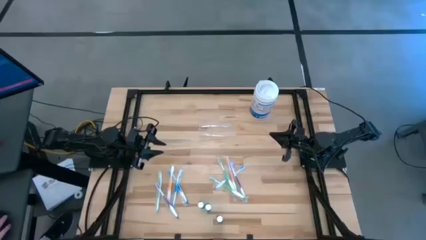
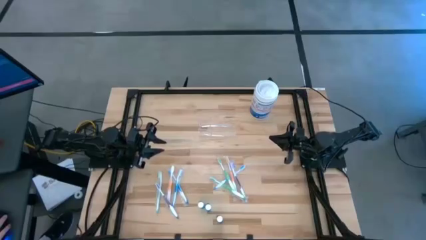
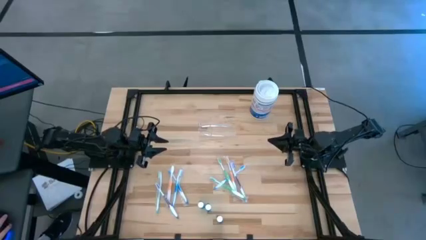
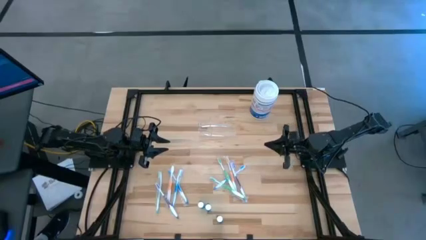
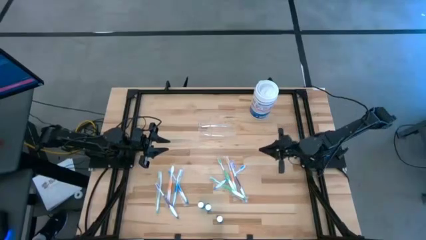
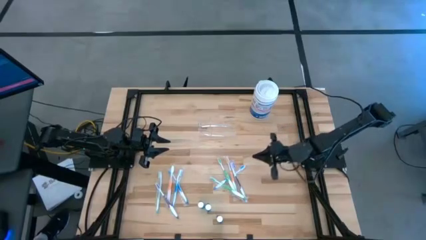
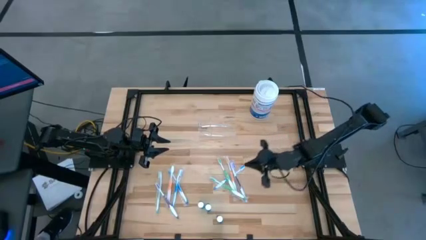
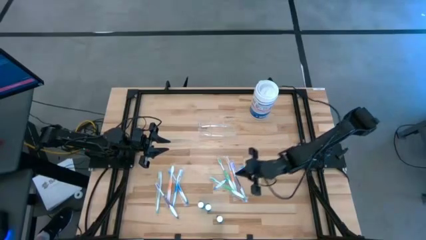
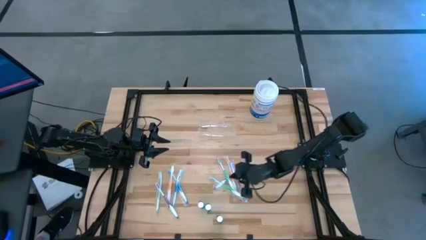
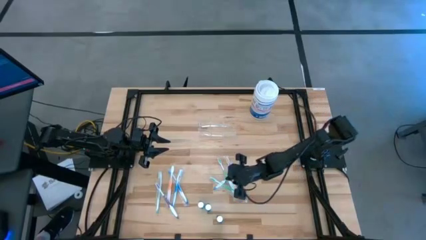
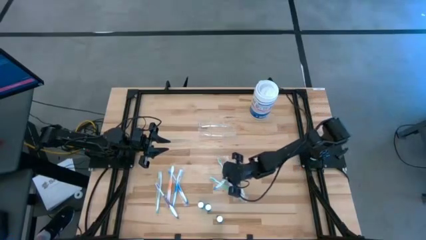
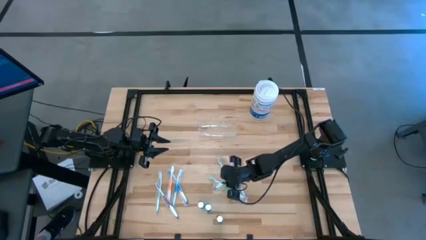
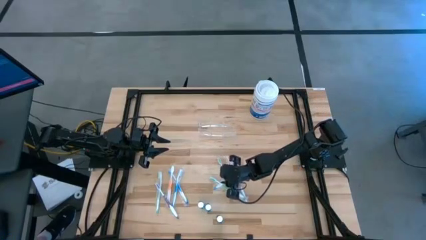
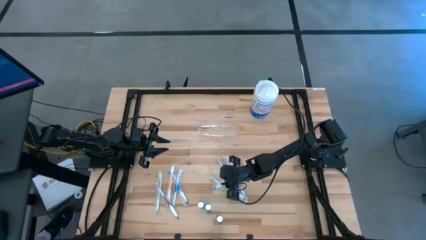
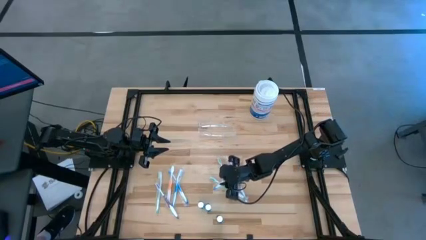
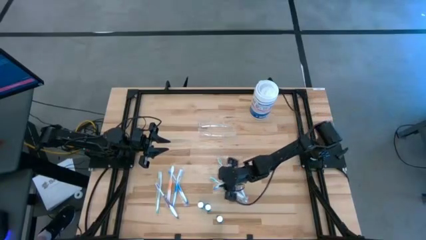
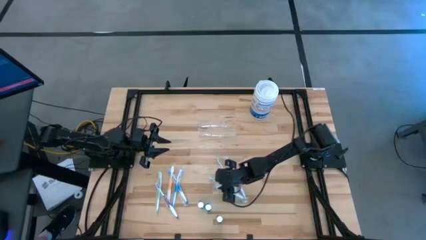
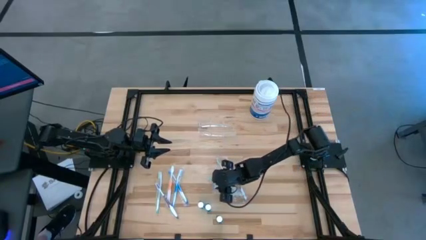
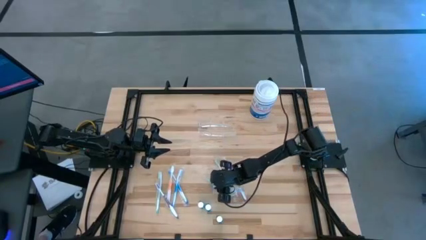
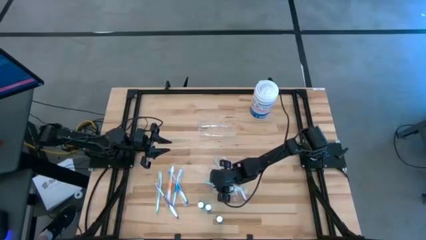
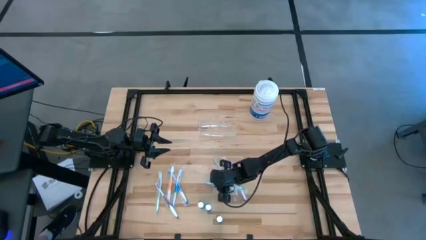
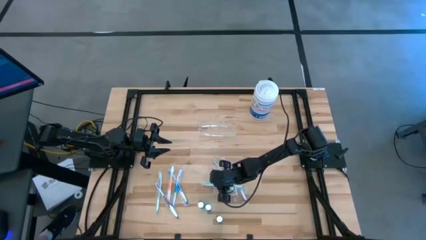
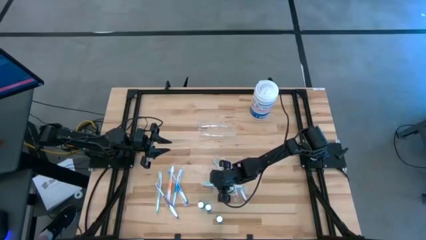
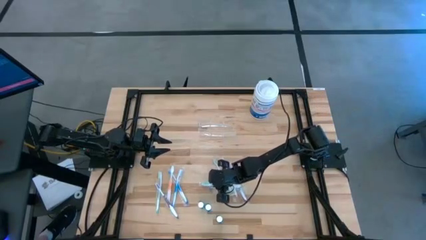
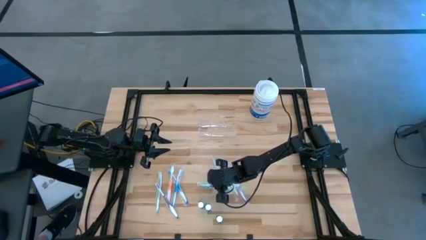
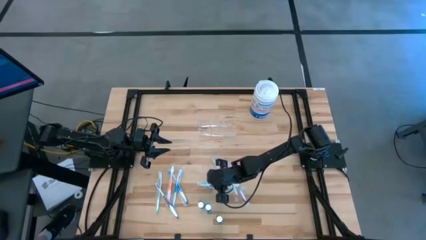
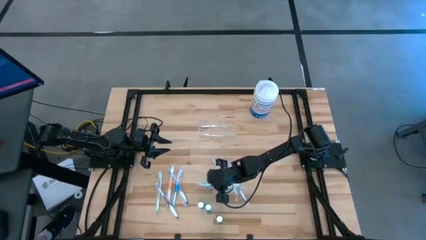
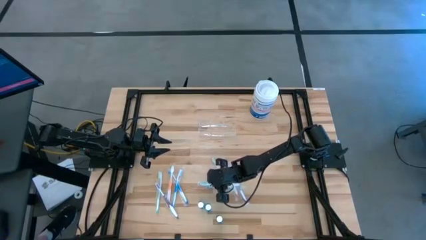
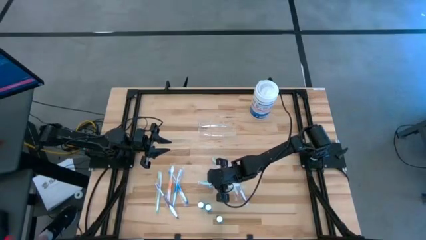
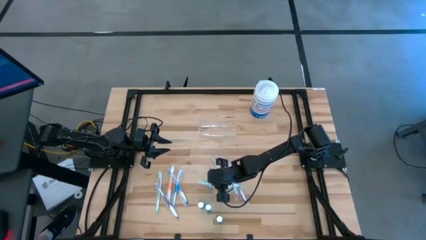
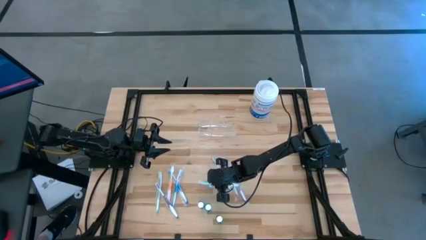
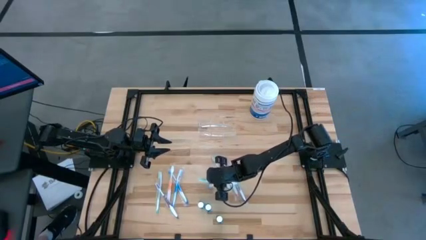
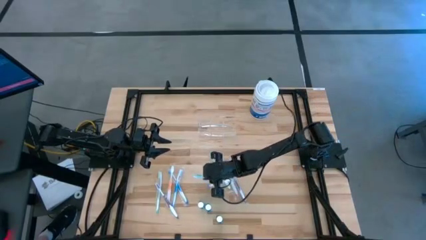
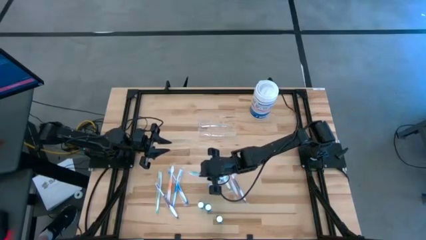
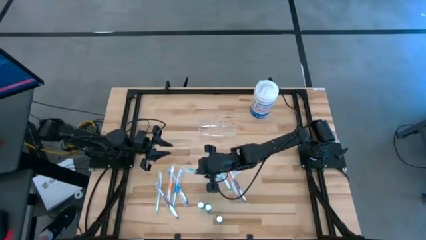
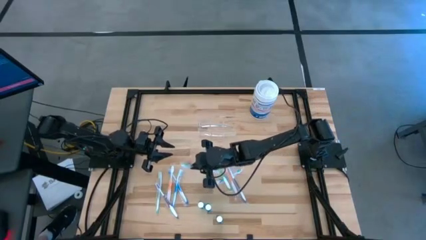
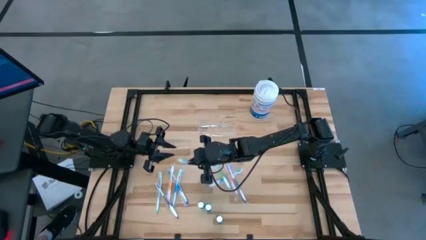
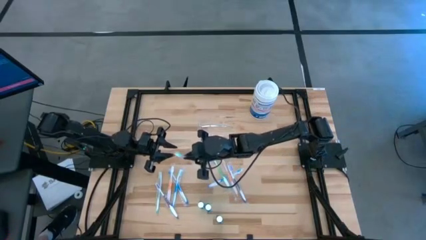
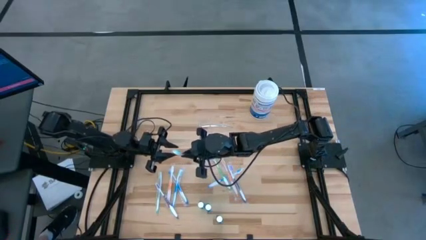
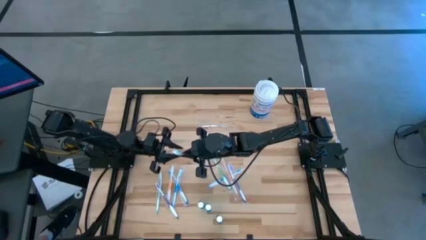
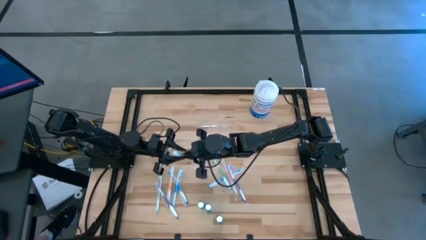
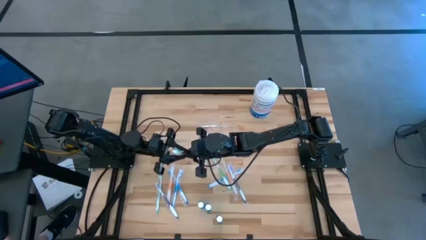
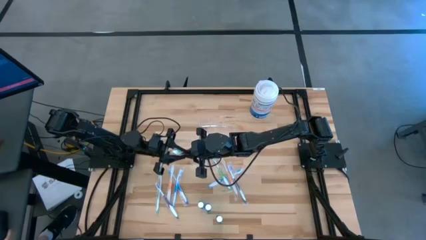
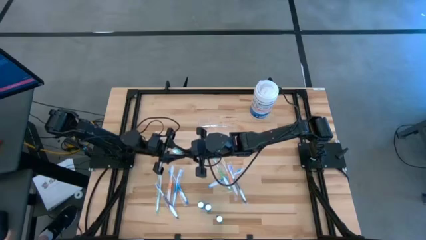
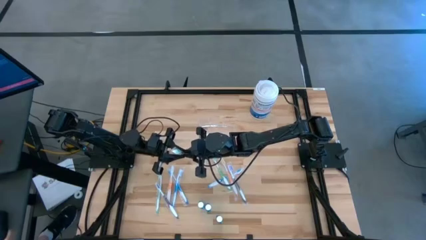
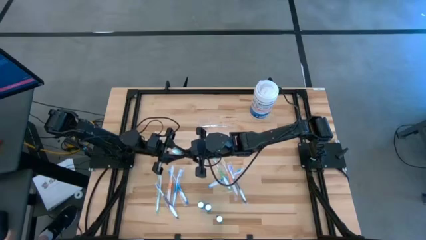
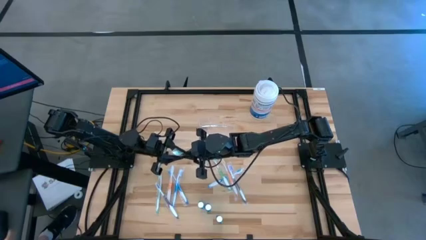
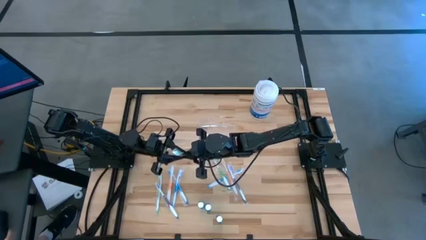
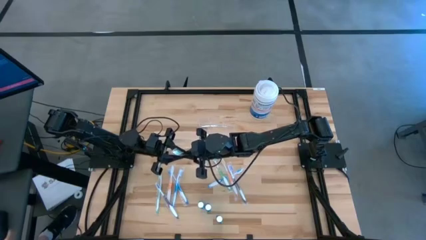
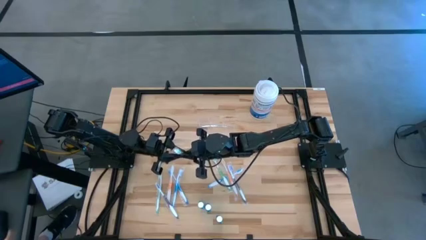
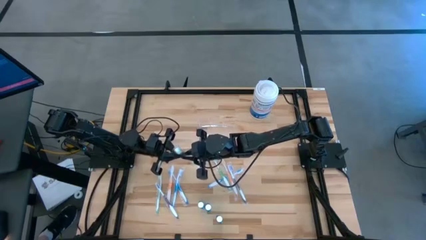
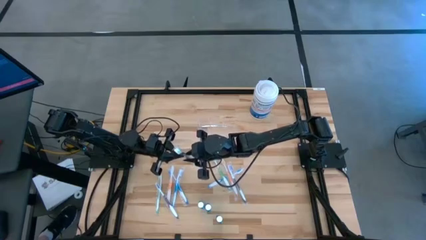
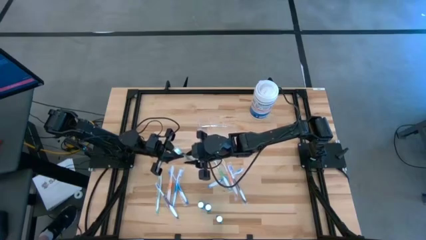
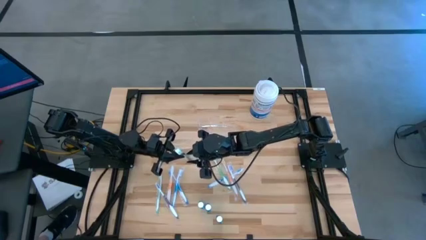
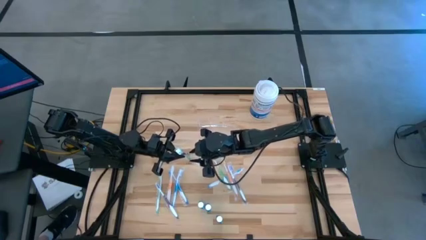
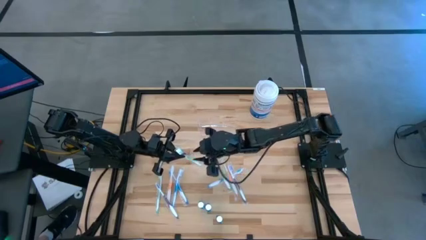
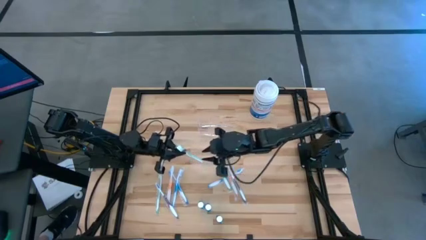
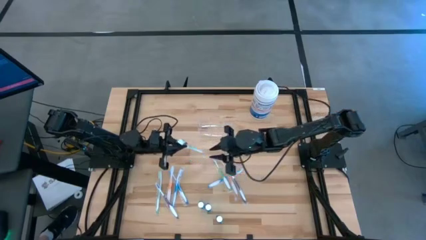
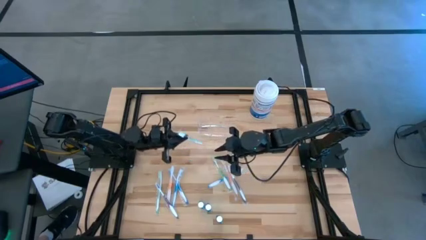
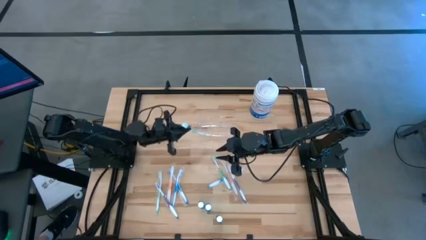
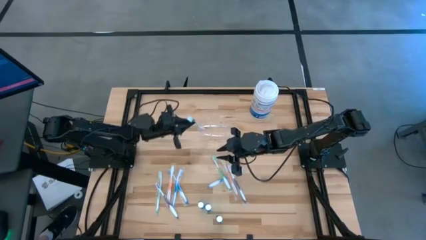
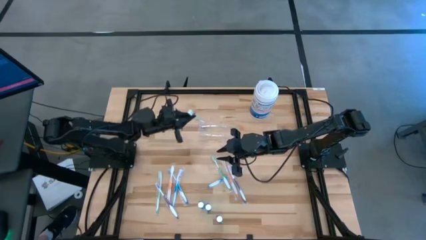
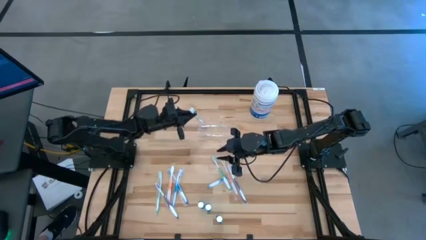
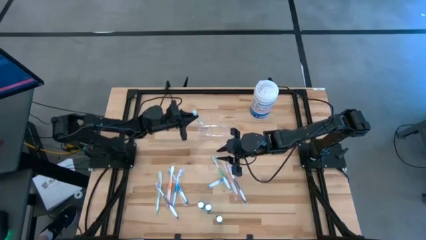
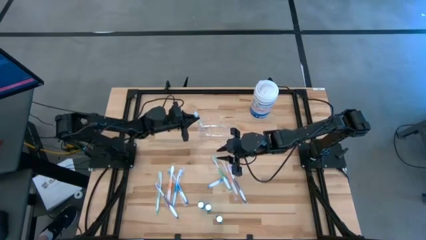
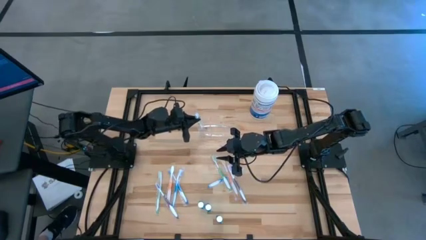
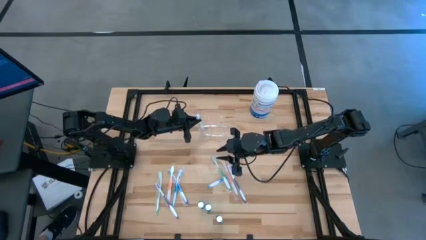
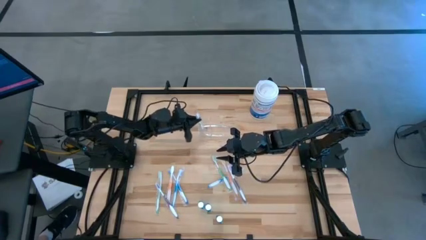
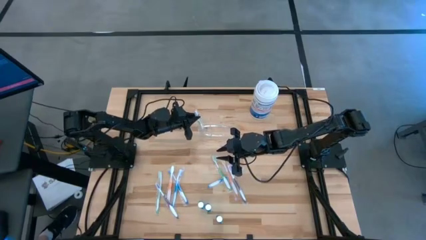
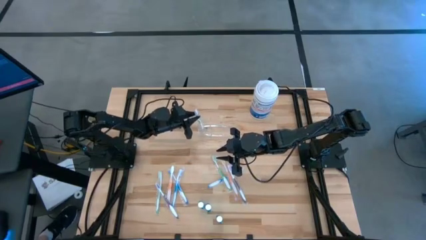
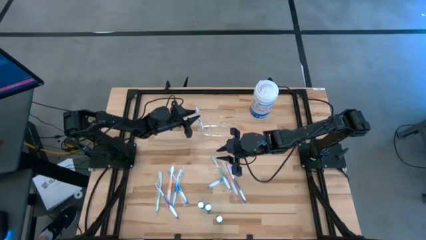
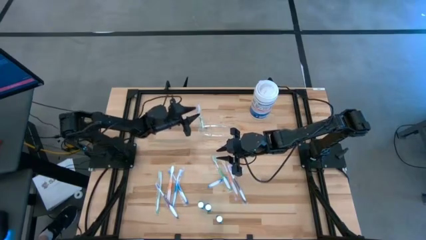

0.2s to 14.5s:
Task: Pick & Place toothbrushing station
Put the middle green toothbrush into the transparent organizer
